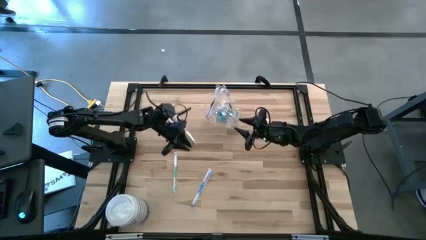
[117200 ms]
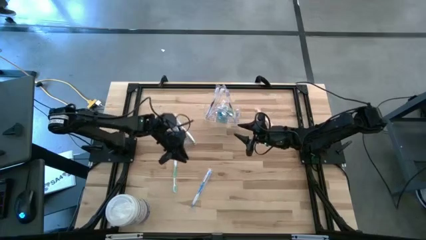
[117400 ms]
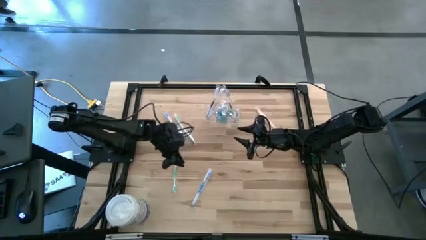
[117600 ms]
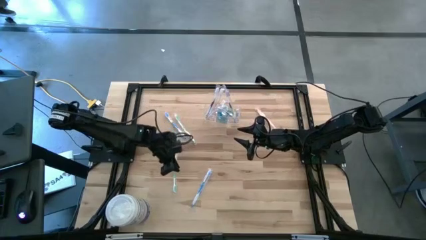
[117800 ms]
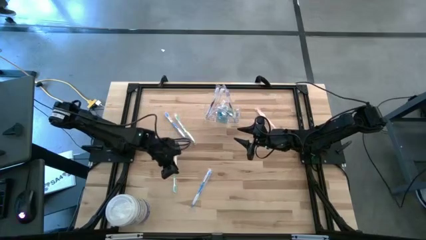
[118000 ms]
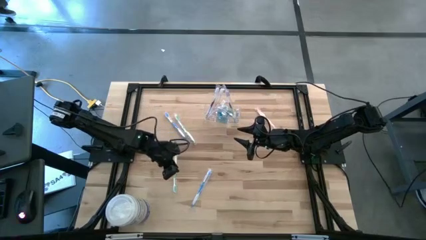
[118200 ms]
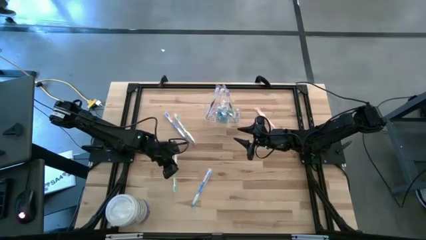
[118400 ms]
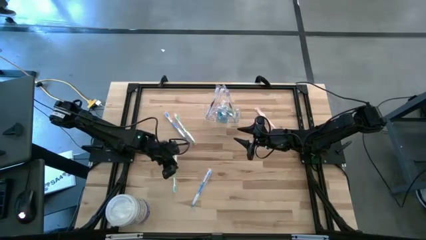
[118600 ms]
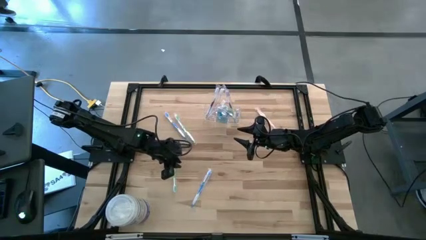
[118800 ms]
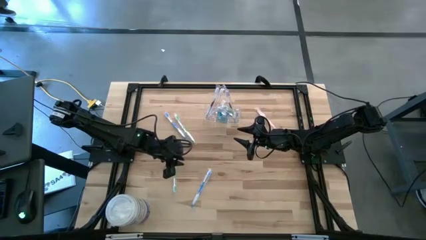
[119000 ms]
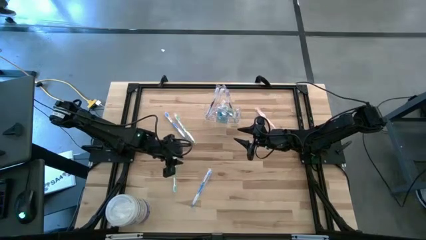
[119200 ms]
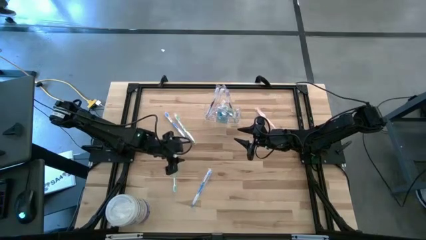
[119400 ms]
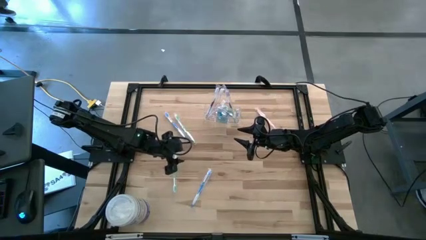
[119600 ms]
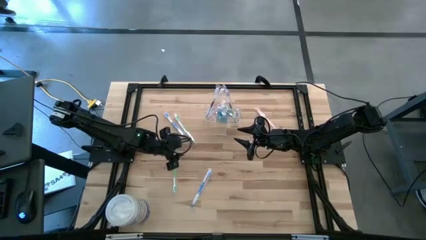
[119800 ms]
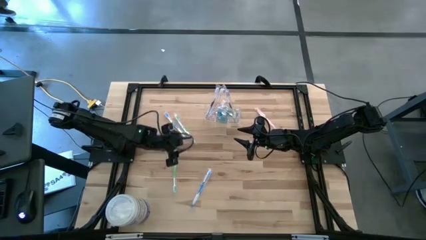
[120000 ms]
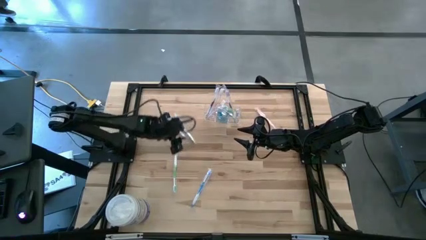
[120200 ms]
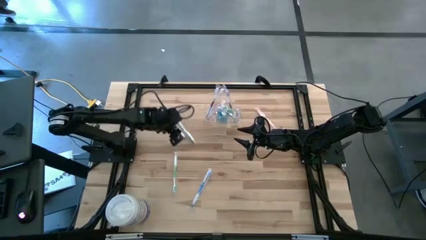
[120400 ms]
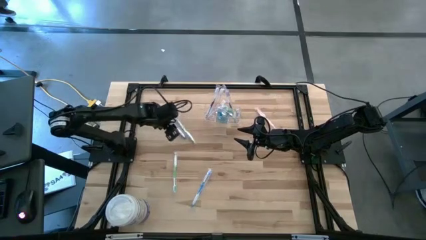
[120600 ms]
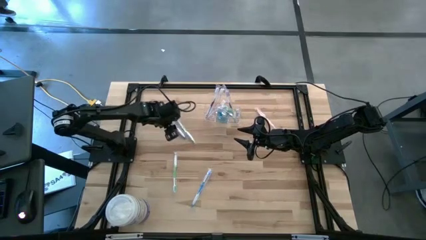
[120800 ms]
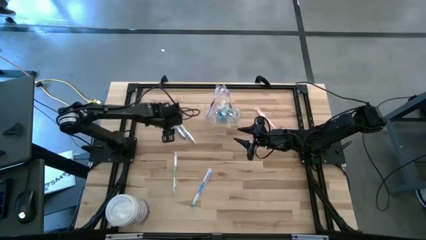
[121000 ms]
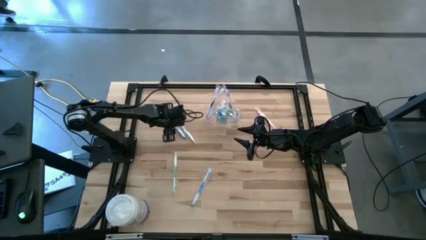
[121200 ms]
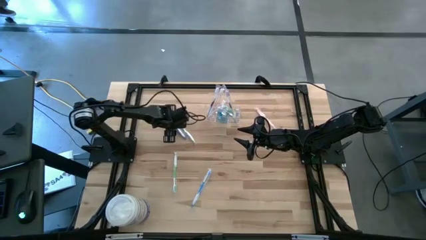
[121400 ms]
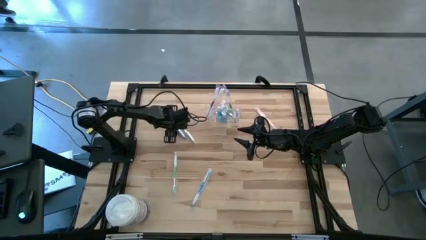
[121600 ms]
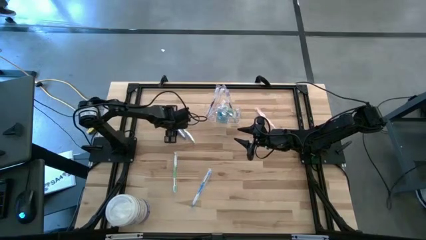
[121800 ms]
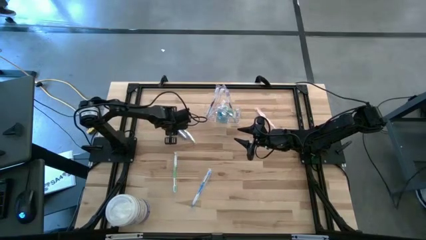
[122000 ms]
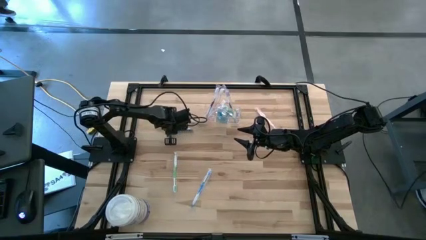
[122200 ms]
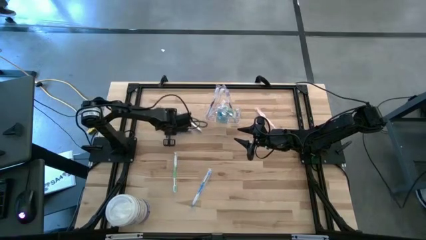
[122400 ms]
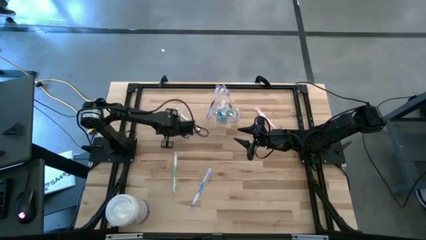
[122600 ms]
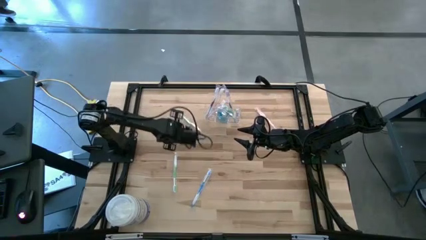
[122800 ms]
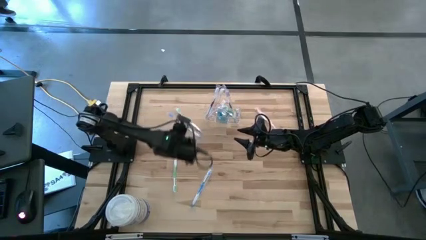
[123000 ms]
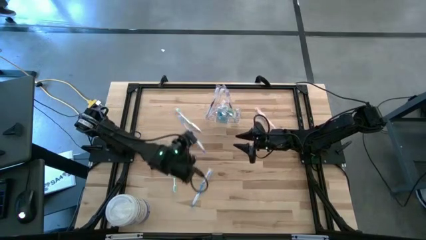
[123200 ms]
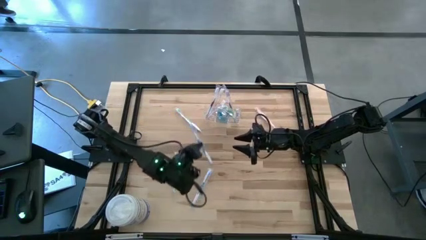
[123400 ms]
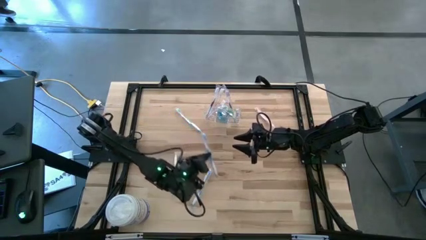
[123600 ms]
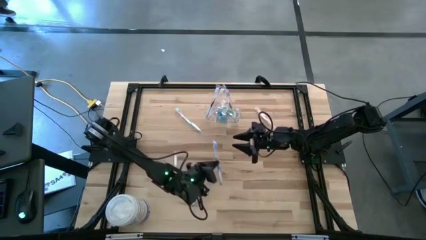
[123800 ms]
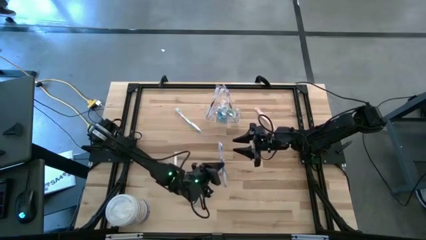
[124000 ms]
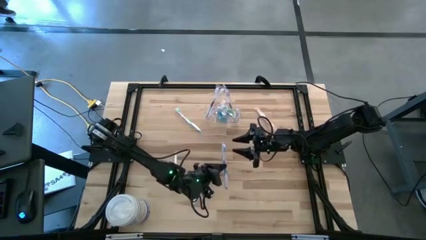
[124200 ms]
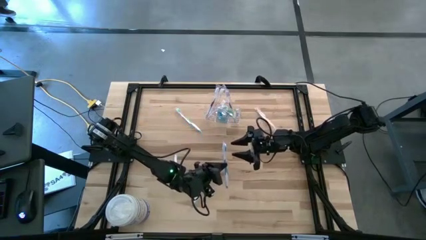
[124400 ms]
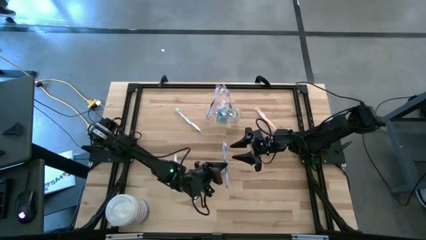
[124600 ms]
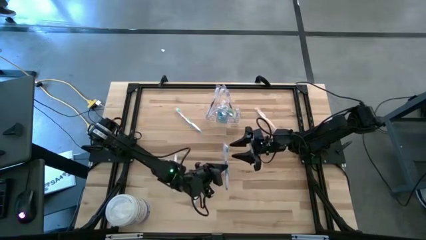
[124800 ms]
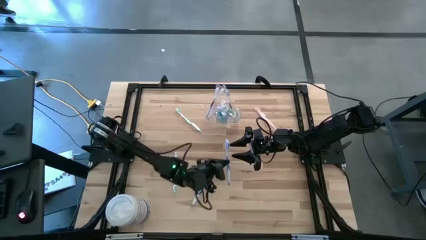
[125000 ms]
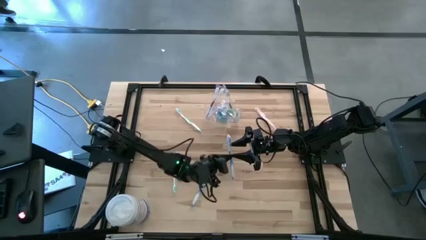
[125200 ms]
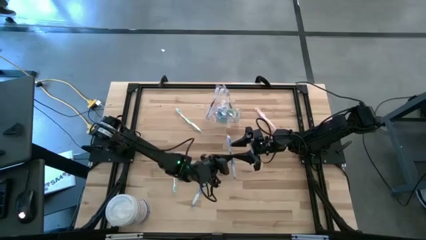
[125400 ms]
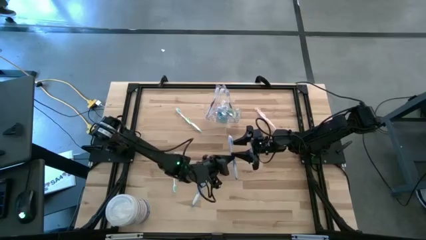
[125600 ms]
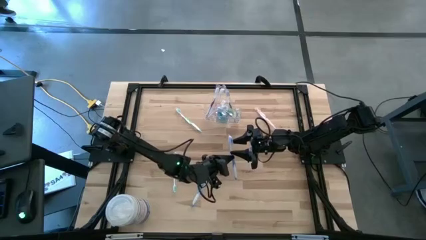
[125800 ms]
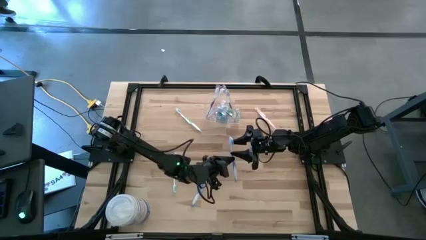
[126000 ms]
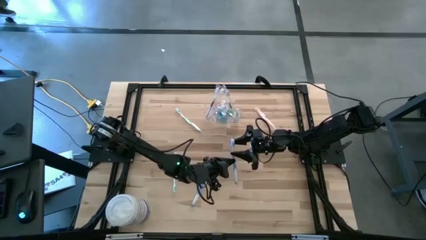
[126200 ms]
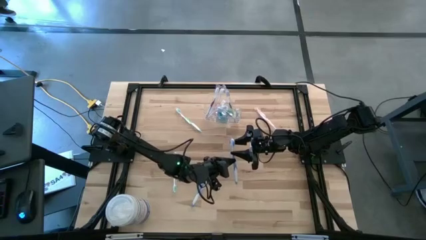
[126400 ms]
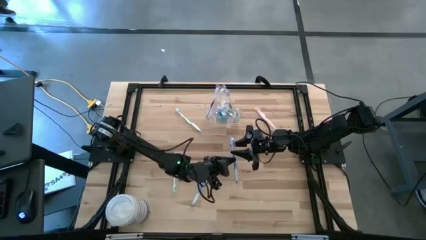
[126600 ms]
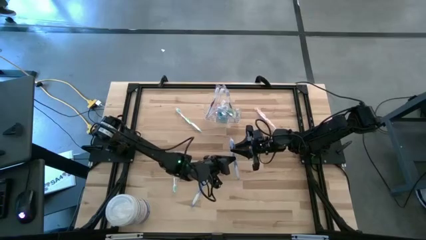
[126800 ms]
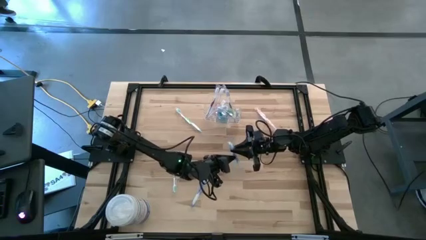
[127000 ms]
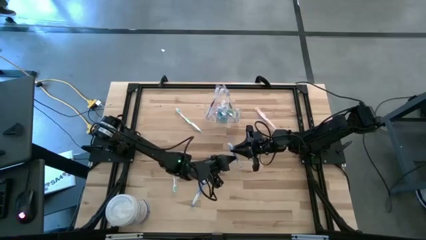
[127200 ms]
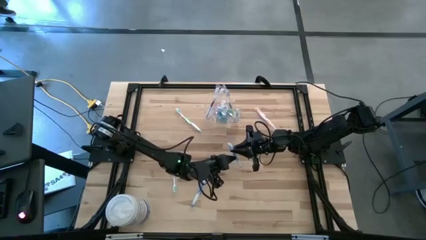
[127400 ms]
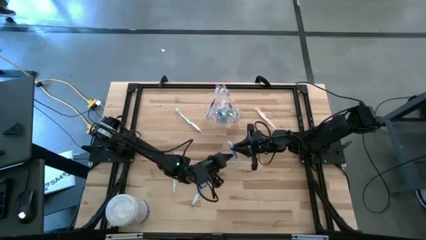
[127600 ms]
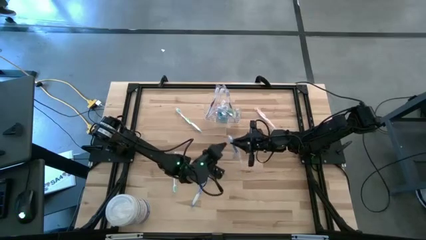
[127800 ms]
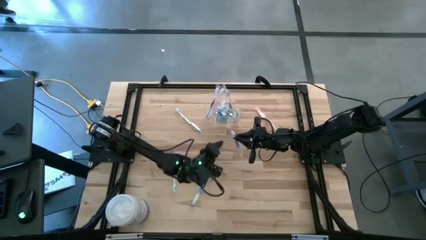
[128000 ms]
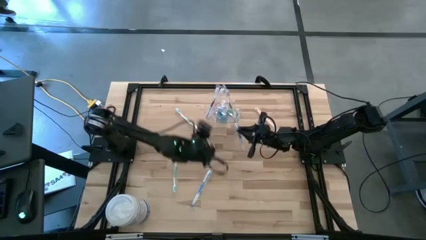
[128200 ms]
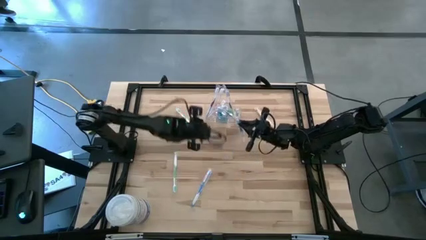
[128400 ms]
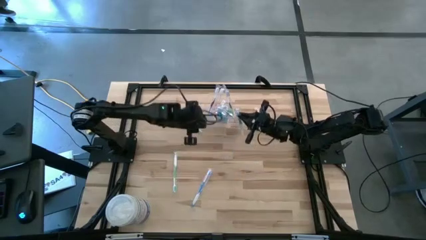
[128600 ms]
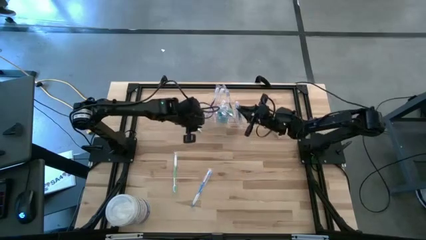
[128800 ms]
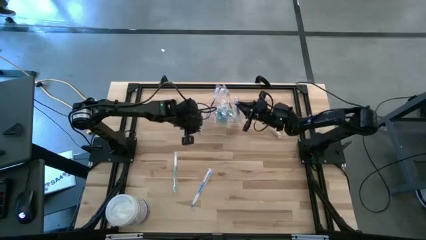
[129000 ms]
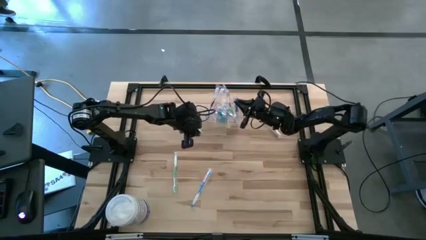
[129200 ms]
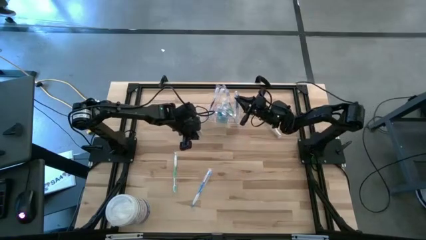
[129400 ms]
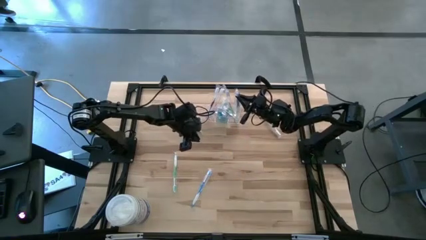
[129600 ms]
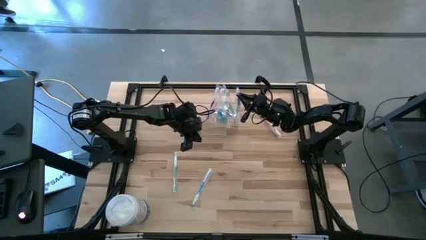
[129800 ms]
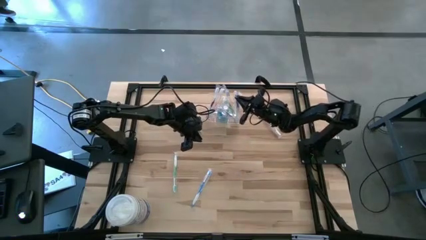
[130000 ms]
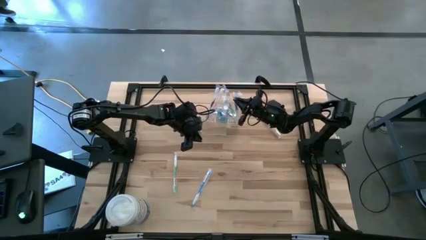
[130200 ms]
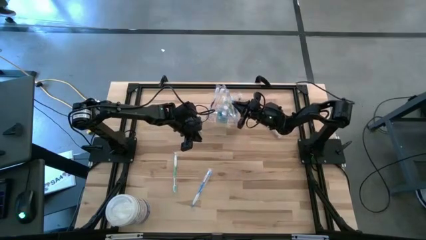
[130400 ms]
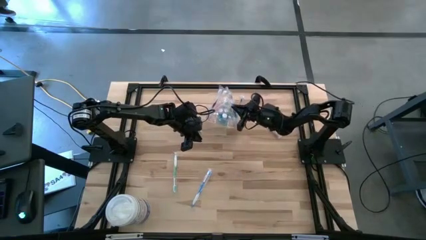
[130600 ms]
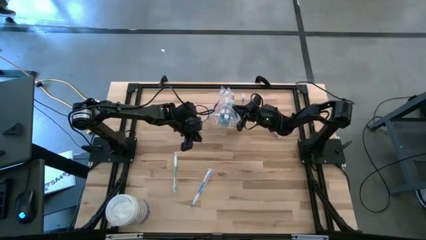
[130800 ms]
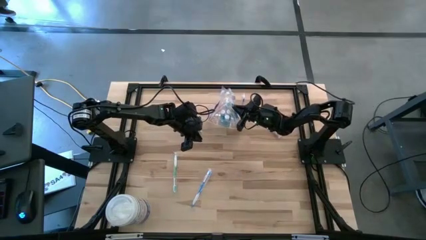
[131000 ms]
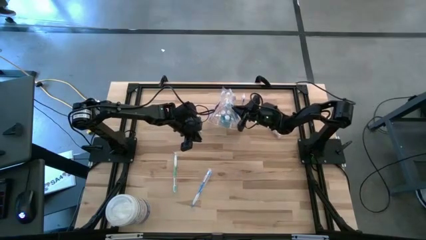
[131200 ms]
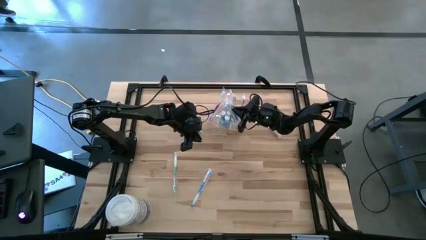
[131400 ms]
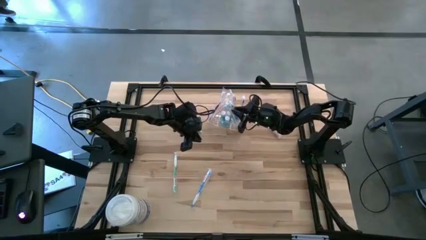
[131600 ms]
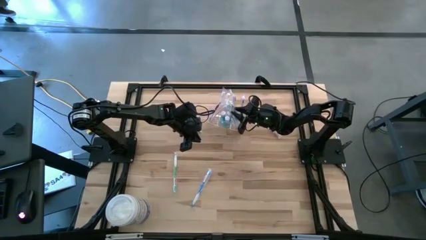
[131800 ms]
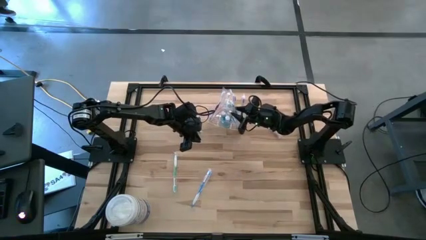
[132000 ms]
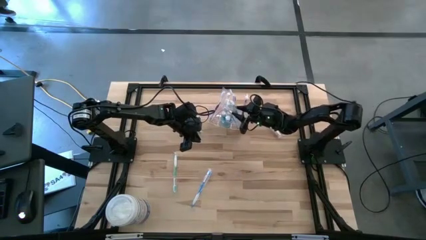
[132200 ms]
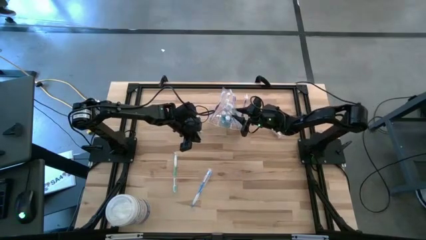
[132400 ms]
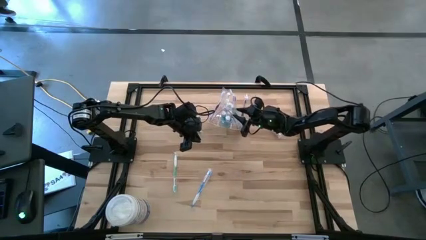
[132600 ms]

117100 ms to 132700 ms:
Task: Pick & Place toothbrushing station
Put the top blue toothbrush into the transparent organizer

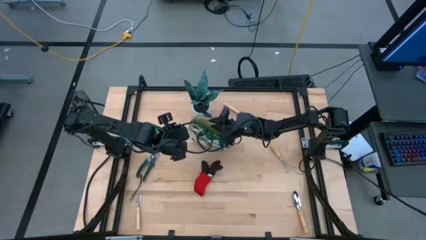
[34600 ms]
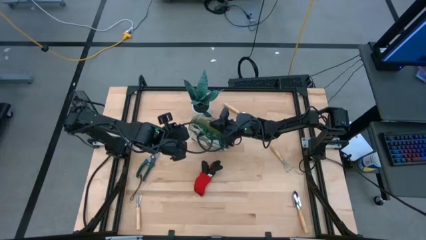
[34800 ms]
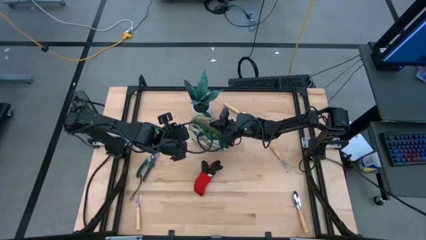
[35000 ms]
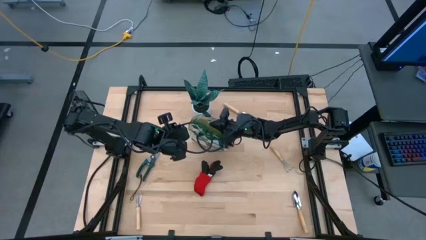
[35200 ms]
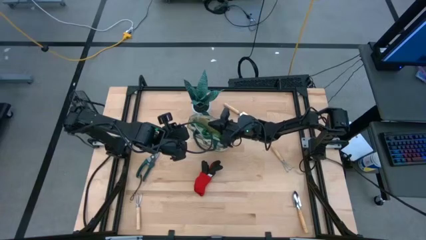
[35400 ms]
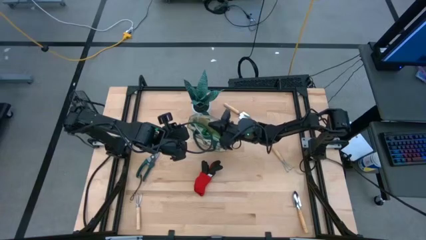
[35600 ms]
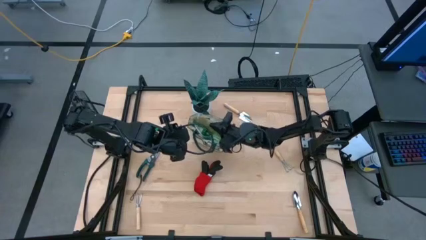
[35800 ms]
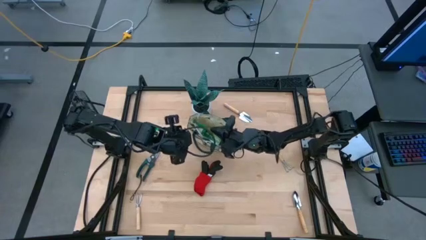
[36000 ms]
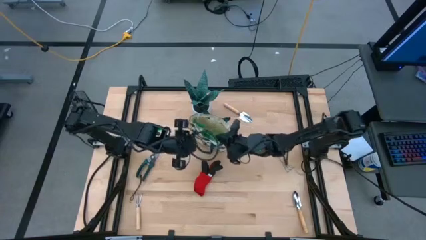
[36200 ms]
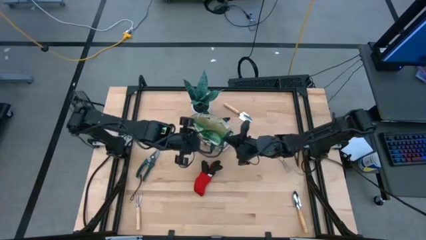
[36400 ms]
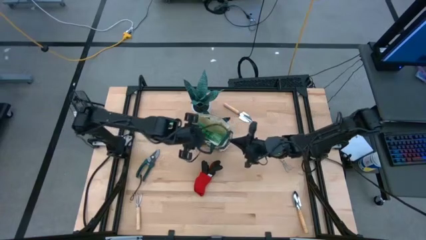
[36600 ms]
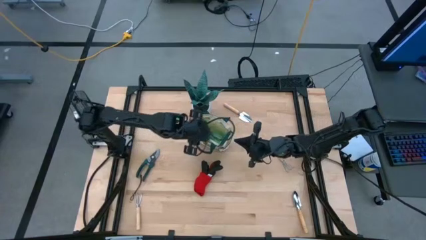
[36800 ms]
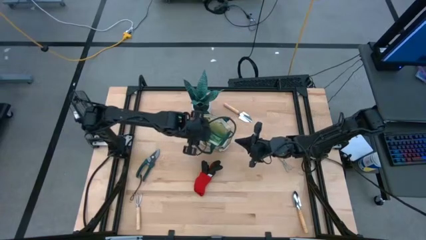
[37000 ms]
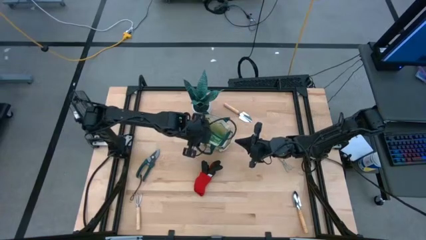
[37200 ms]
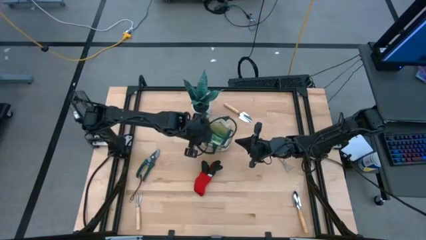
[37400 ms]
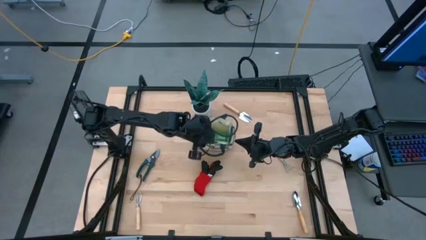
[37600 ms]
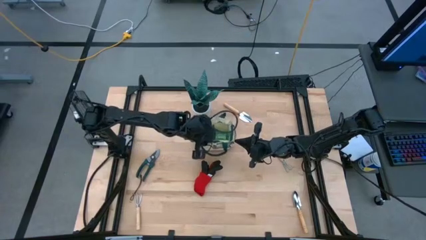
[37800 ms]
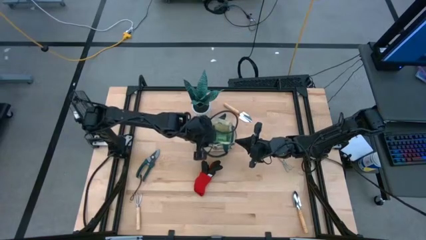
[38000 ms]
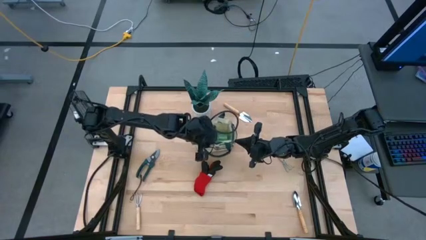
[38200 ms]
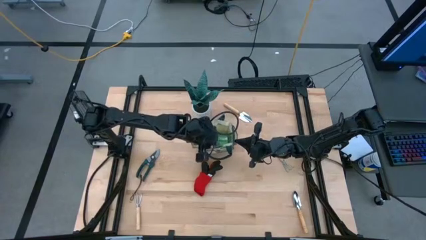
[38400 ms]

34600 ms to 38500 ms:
Task: Pick & Place Garden tools in Gardening bag
Adjust the gardening bag
